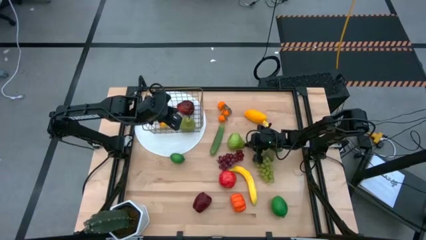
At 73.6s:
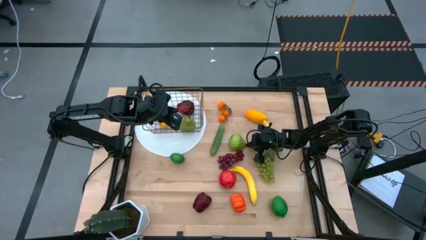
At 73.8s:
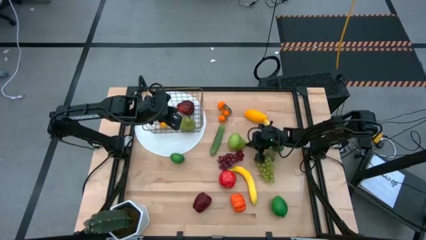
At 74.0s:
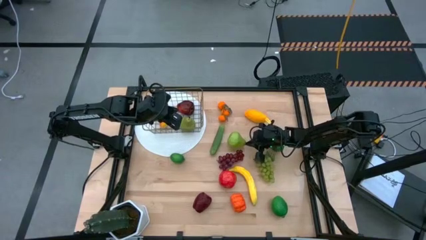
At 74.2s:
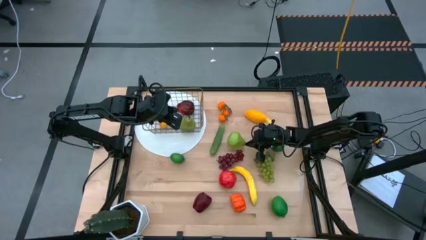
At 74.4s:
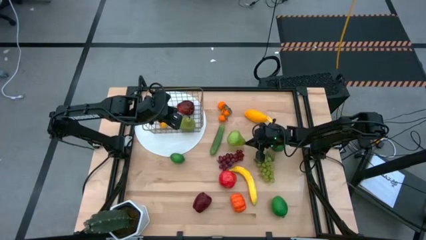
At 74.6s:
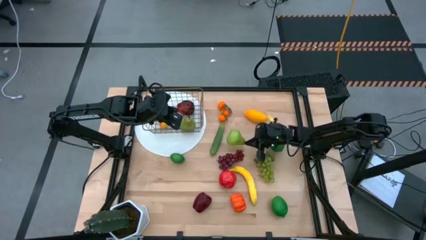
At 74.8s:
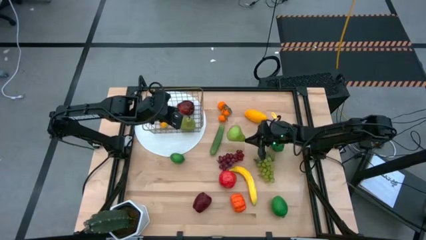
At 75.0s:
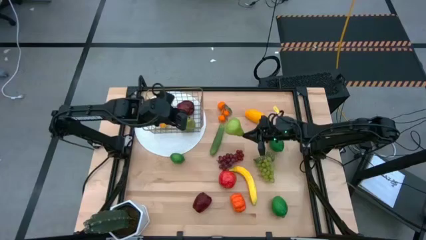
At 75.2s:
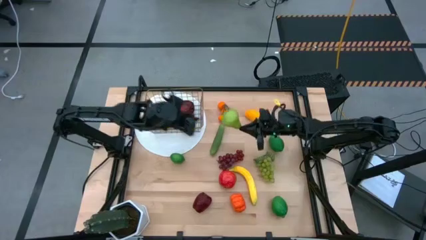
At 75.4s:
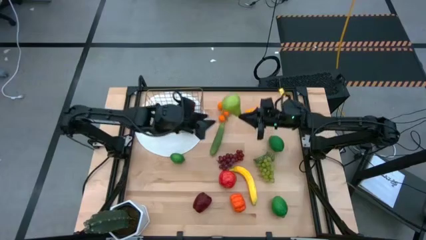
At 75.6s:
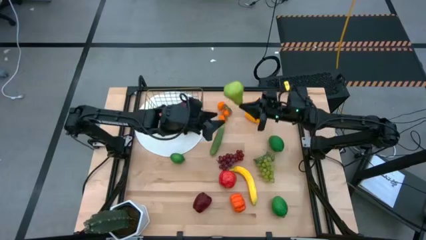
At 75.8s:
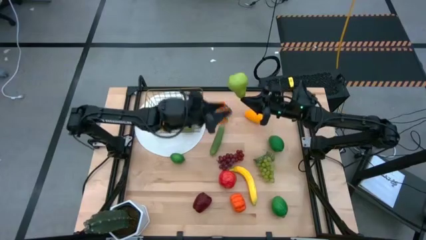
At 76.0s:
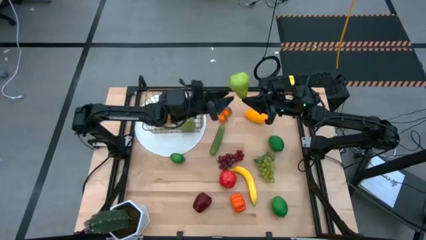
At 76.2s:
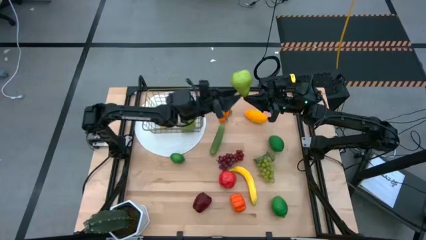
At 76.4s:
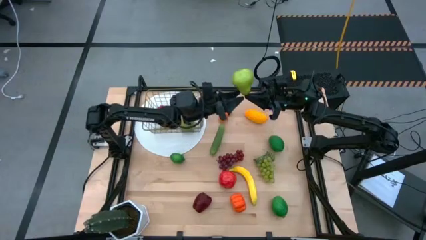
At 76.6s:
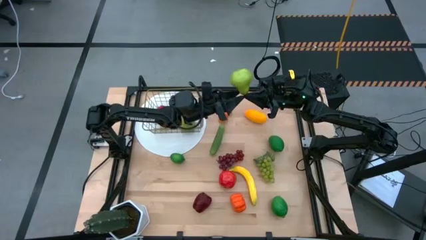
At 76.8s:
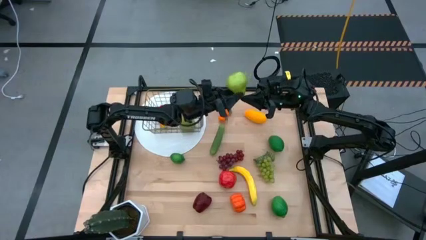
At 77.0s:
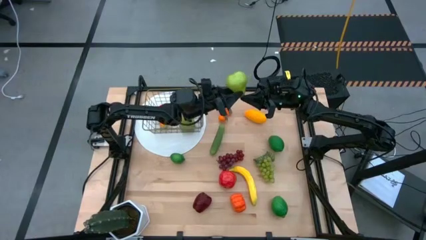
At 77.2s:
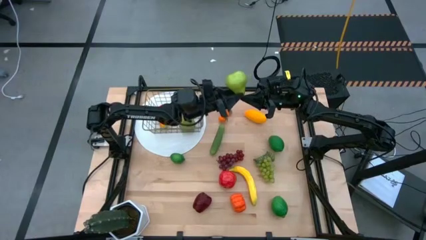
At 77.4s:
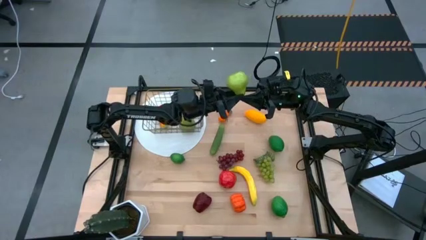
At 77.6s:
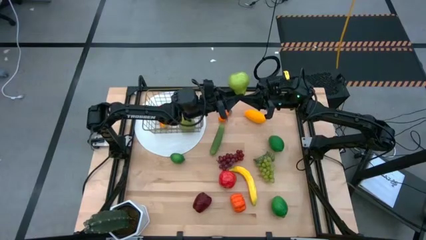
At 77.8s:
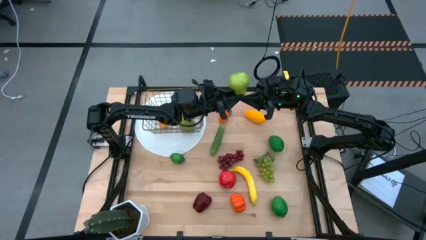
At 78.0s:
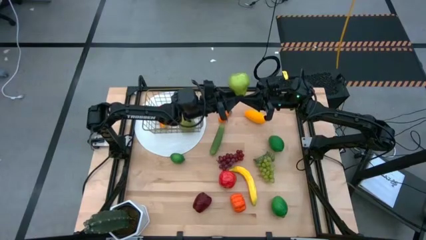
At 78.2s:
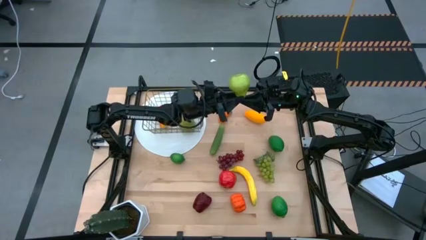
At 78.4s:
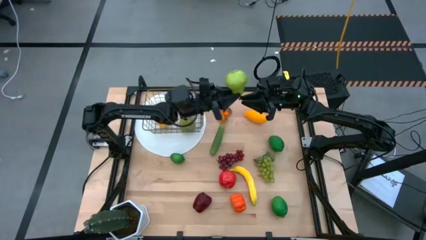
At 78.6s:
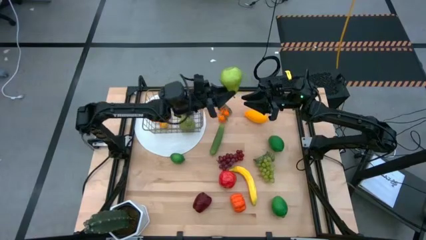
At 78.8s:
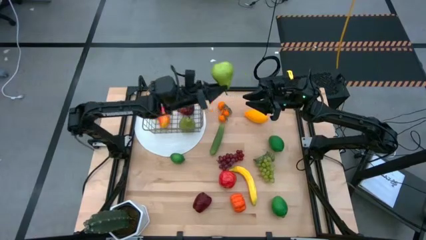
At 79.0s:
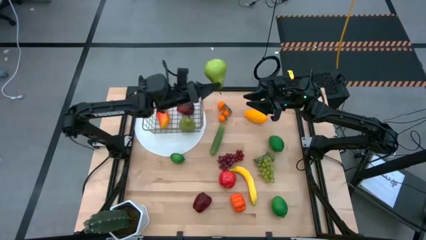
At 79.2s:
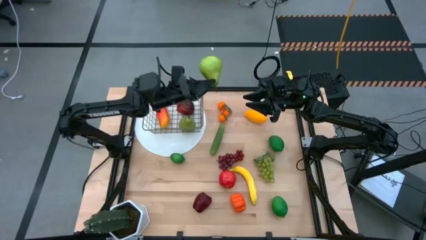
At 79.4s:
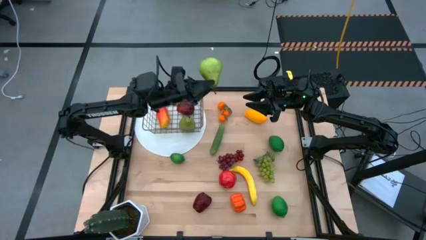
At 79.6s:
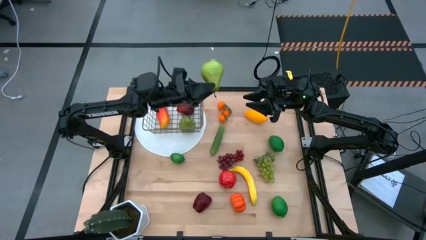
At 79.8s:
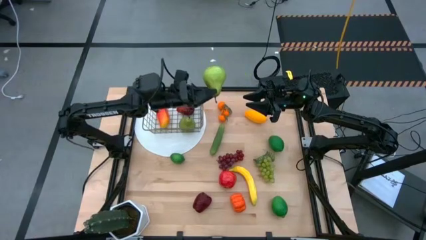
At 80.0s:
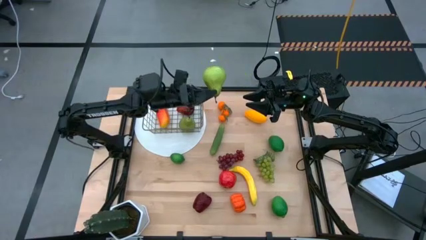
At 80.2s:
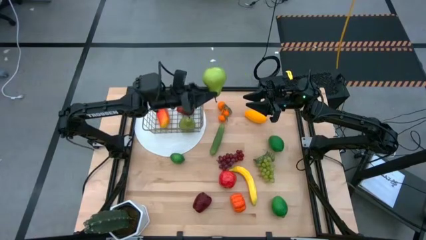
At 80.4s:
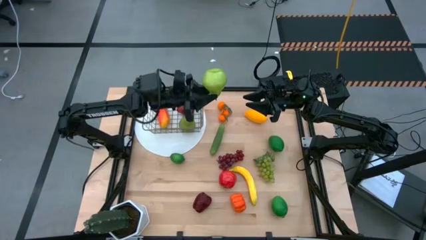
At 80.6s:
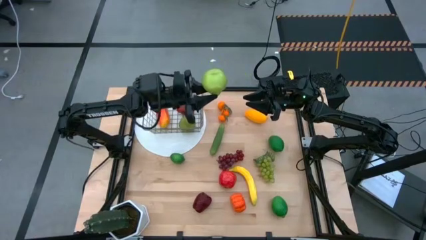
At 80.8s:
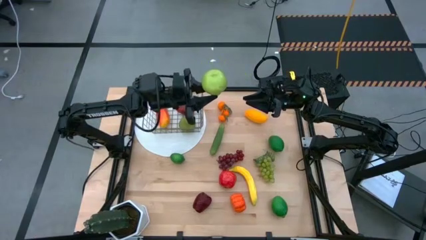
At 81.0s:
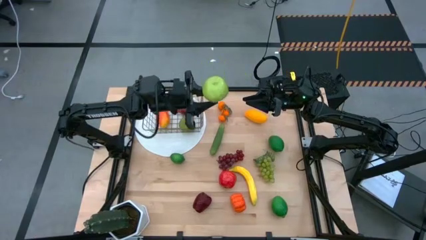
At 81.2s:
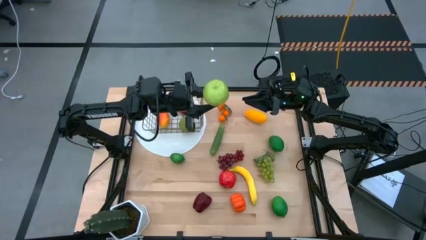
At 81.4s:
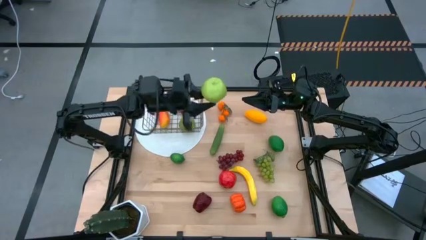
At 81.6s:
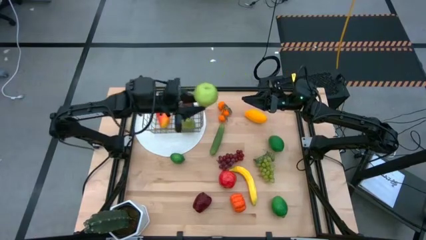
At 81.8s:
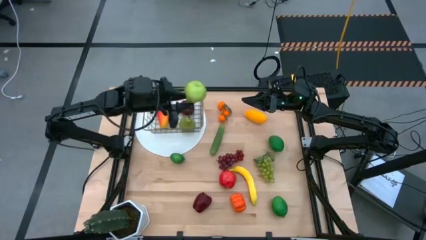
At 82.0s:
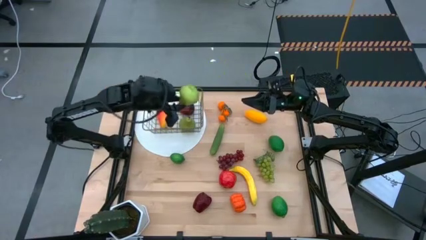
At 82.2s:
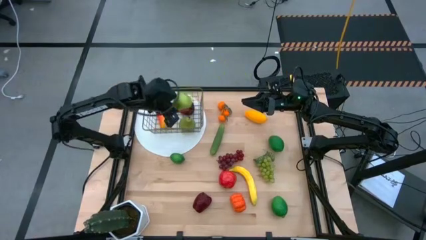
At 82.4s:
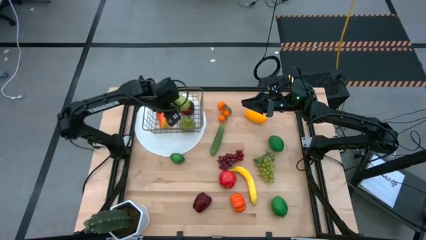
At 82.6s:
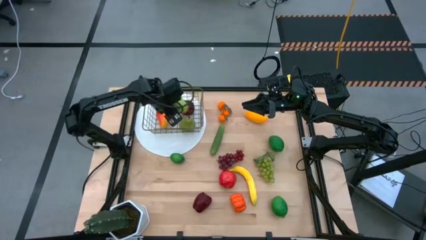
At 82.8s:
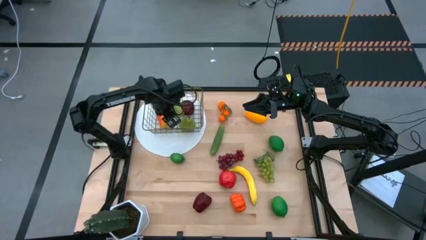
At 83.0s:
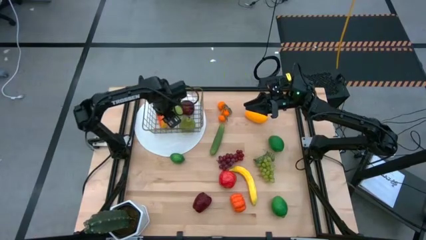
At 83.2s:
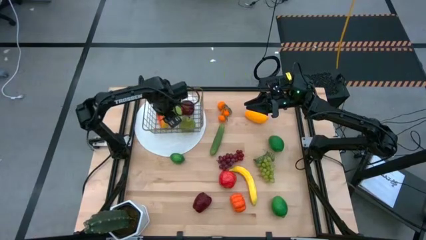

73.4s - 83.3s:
Task: Build produce basket
Put the pear into the wired basket

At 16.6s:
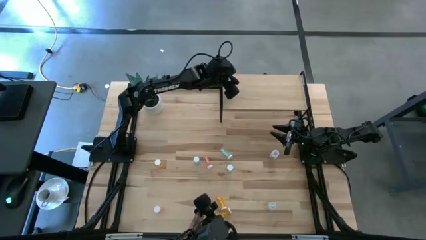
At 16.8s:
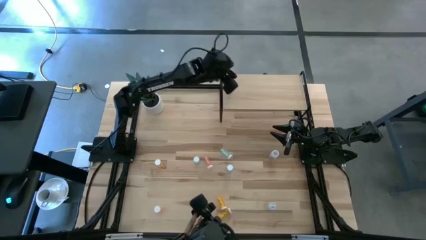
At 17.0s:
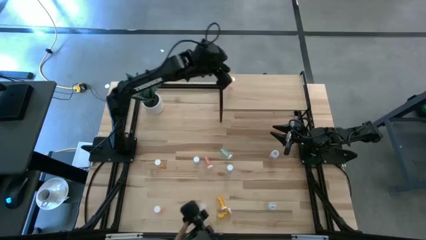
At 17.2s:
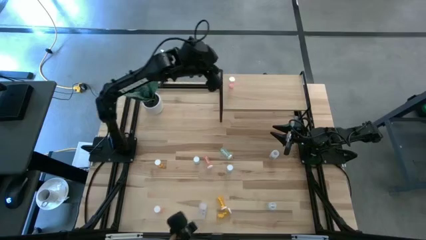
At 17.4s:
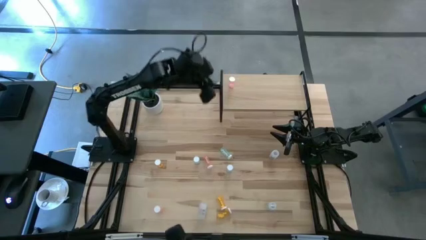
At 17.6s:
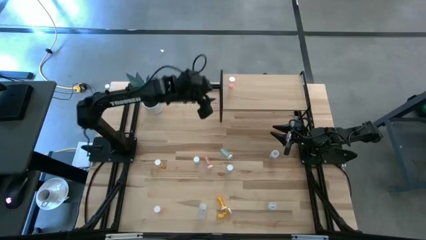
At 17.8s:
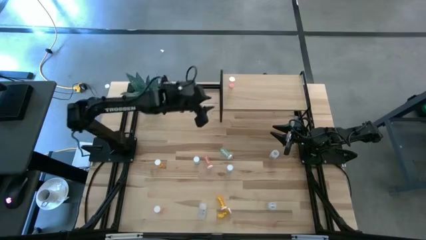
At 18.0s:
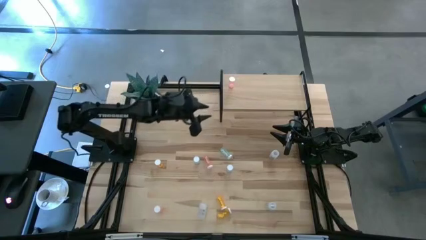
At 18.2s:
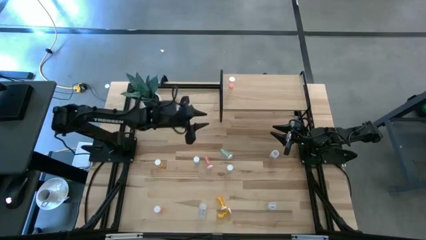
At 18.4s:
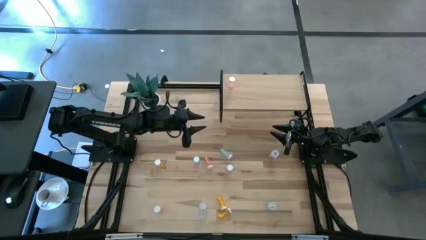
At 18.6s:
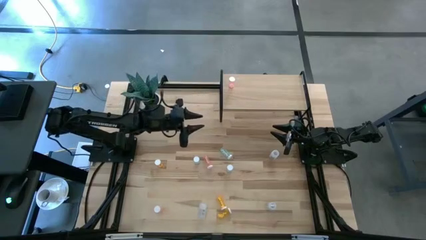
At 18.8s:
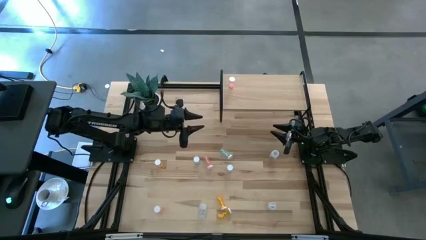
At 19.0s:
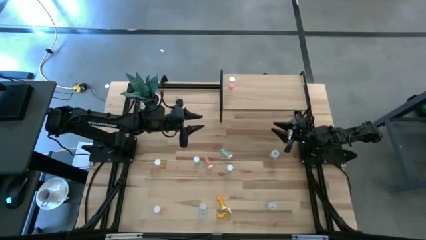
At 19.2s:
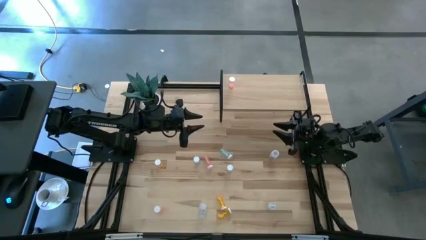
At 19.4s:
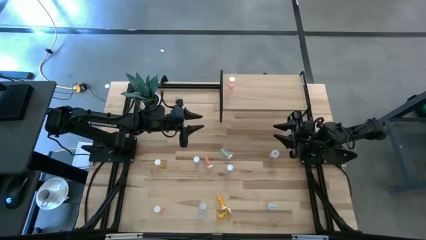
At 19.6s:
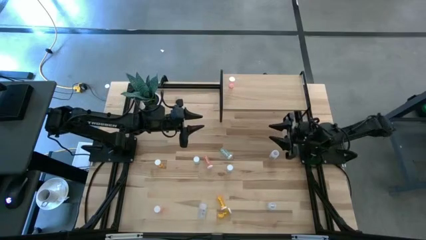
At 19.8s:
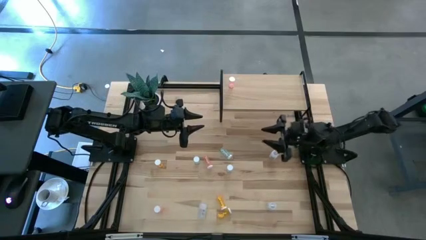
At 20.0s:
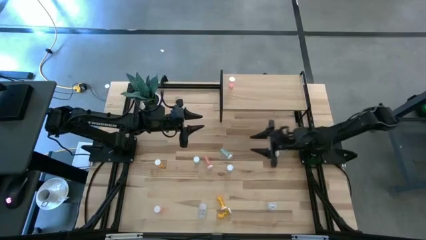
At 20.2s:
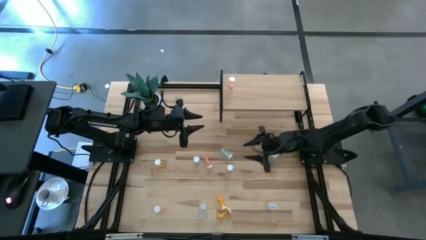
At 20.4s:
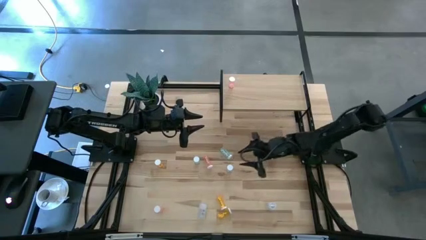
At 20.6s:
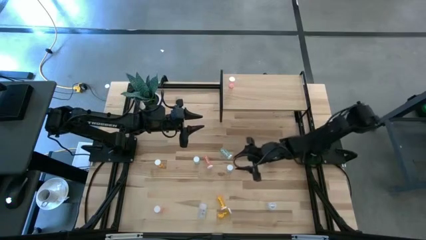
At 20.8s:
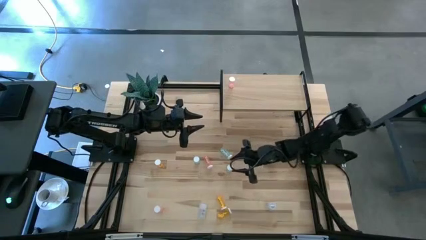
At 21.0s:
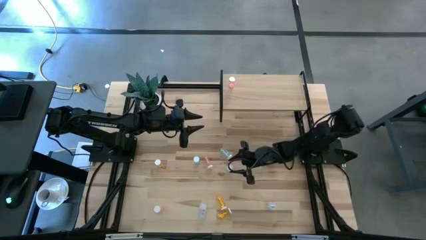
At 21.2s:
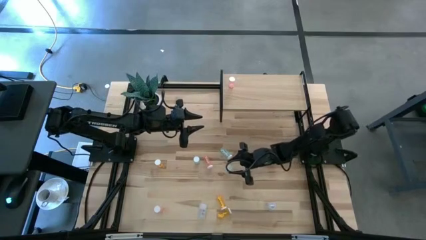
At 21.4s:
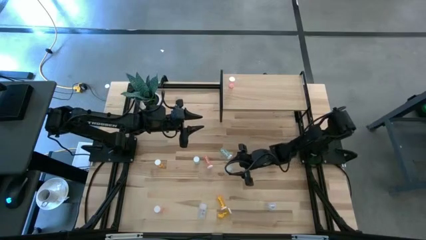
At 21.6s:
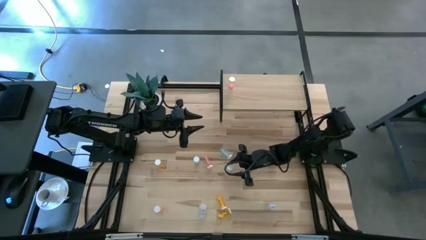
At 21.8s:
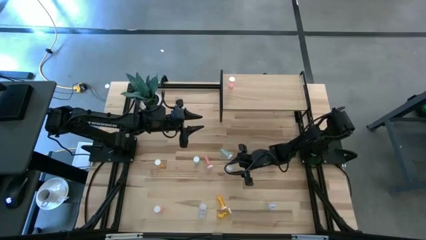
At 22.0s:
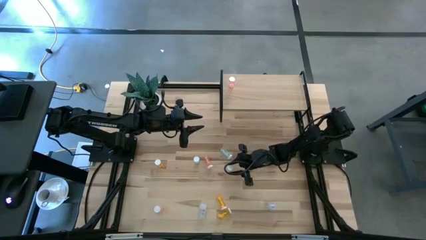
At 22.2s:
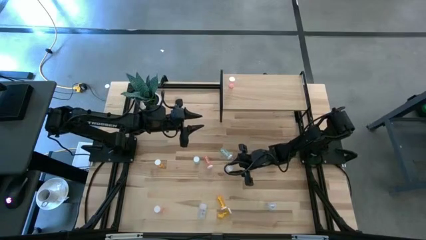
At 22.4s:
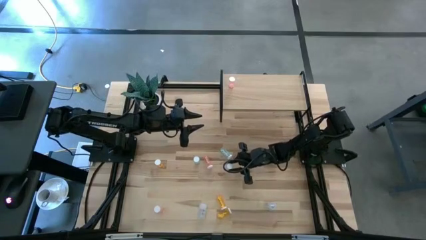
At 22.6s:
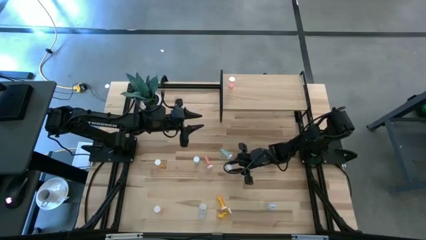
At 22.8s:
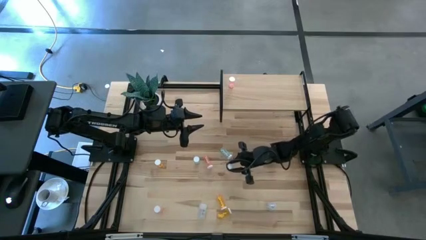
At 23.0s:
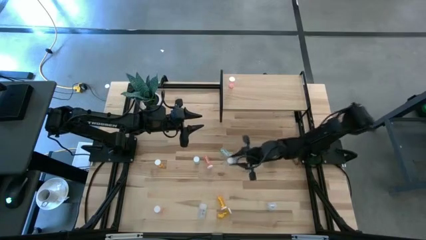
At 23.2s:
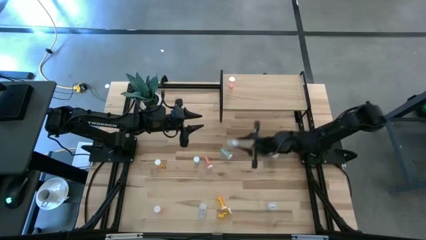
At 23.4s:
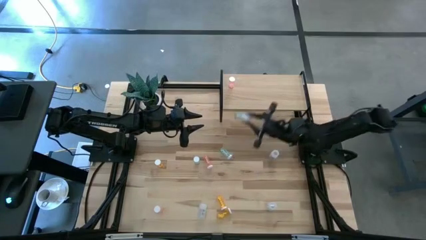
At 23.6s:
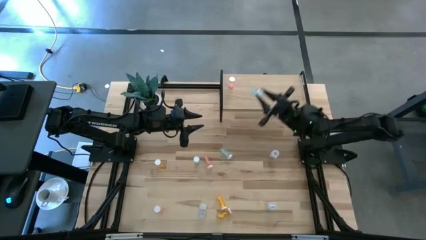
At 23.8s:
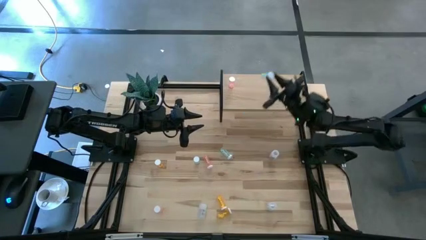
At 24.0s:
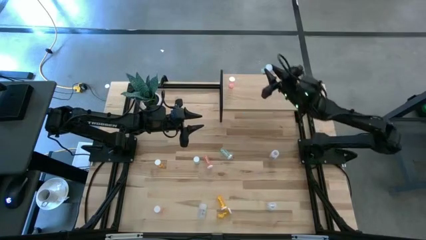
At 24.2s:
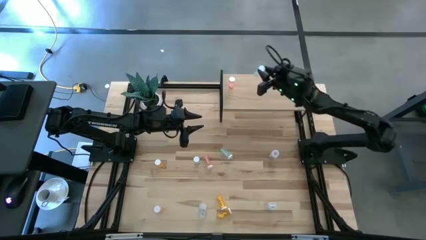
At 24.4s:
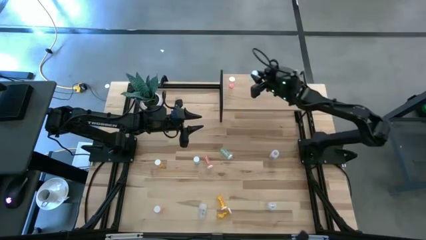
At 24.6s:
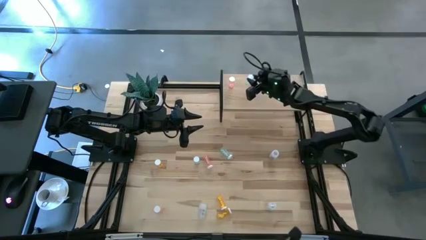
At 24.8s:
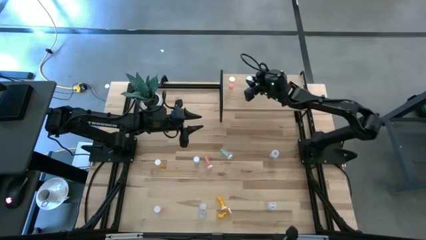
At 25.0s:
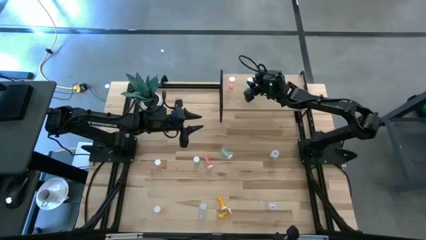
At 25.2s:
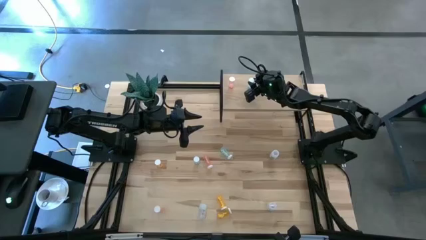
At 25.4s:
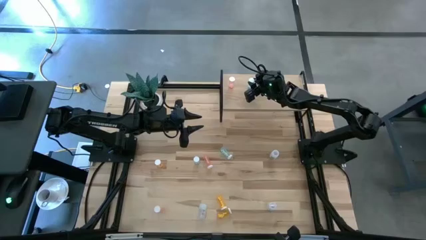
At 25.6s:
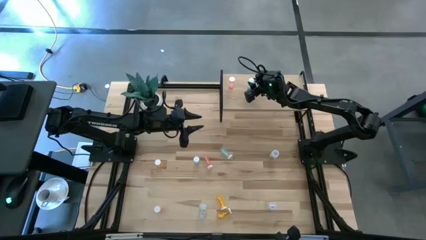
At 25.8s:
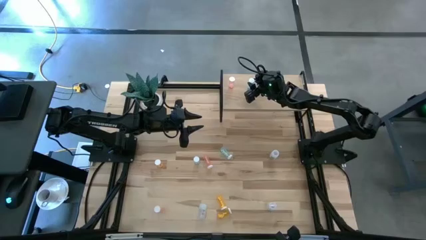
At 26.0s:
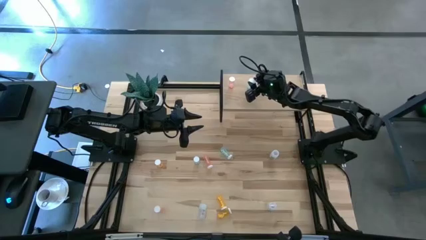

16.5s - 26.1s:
Task: Pick and place medicine bottles onto shelf by color
Put the bottom green pill bottle on the shelf
